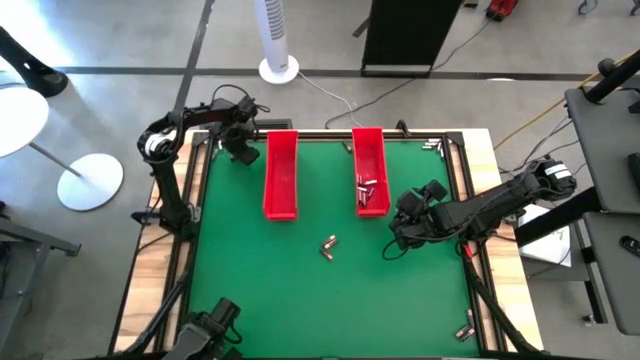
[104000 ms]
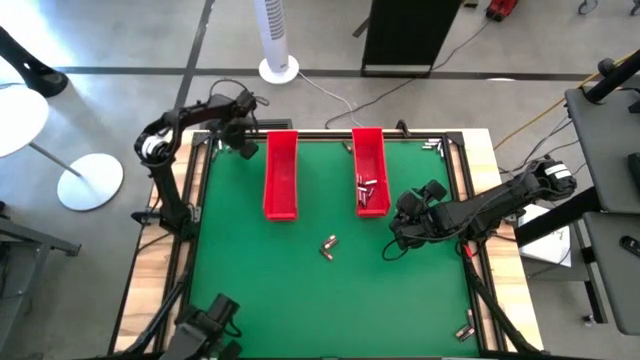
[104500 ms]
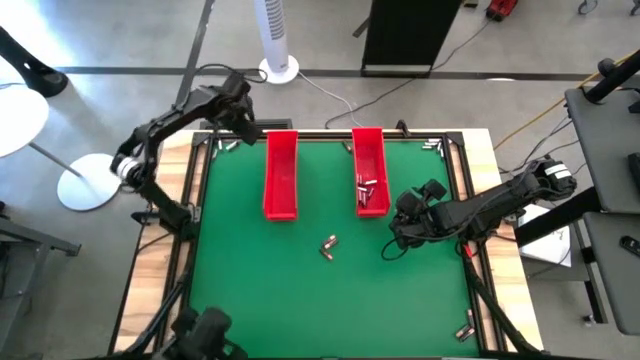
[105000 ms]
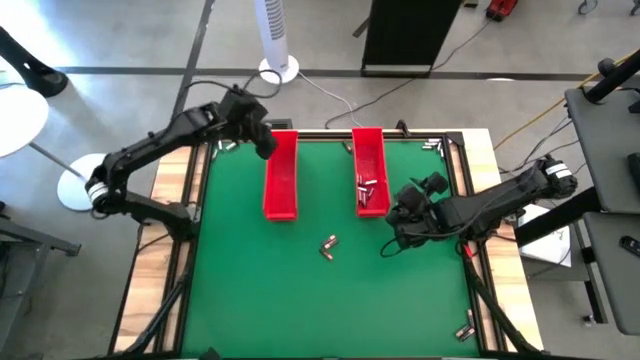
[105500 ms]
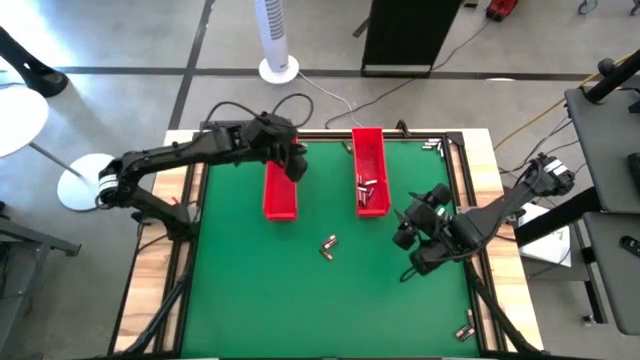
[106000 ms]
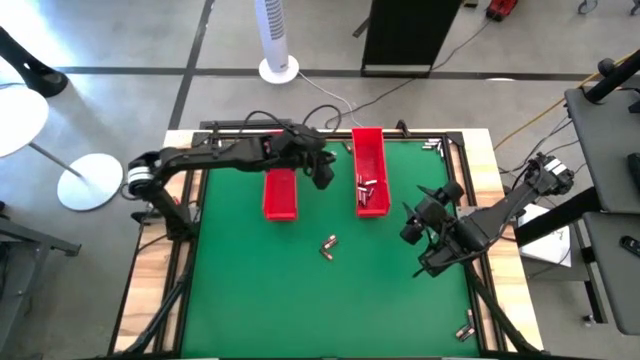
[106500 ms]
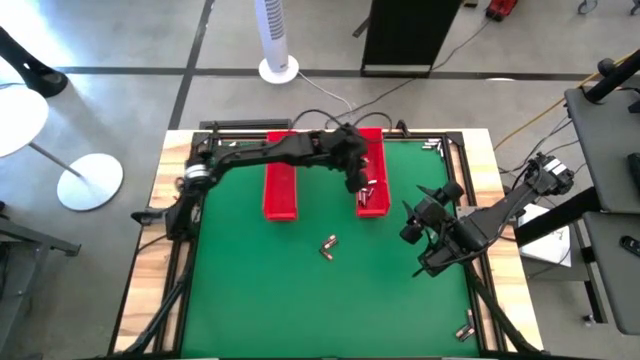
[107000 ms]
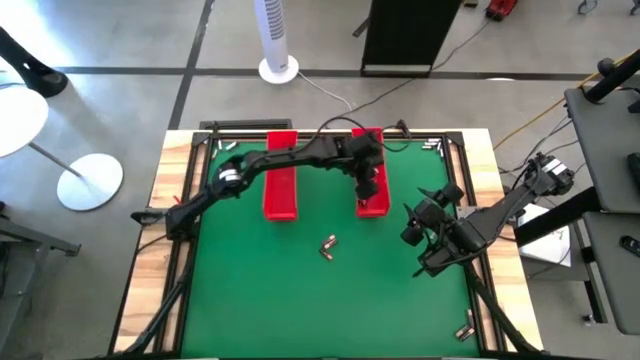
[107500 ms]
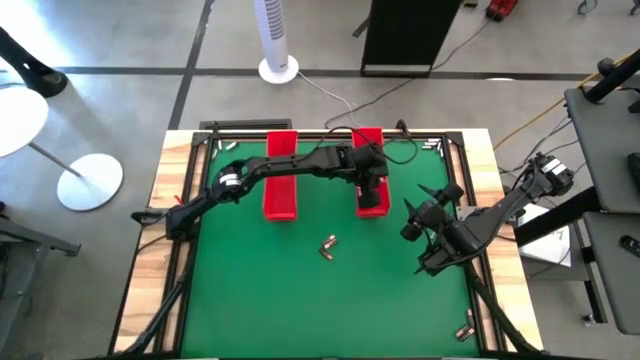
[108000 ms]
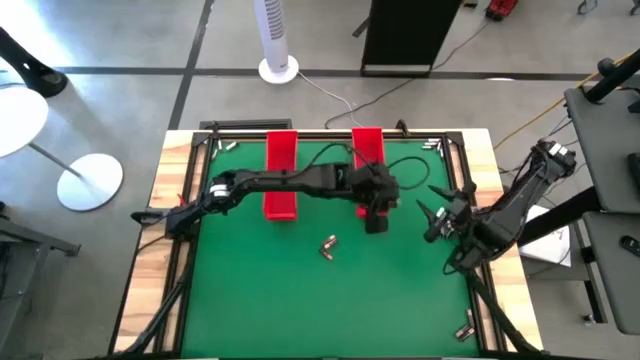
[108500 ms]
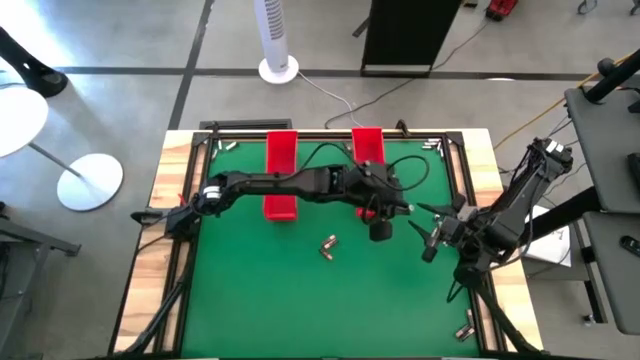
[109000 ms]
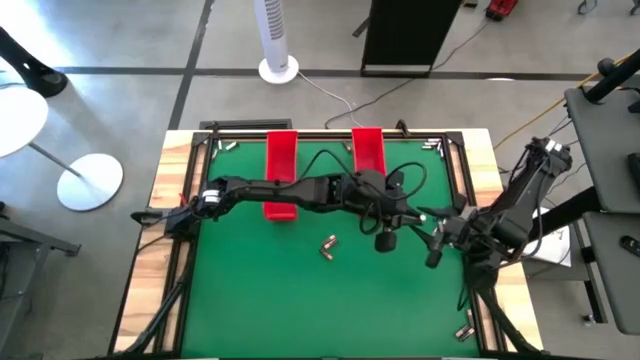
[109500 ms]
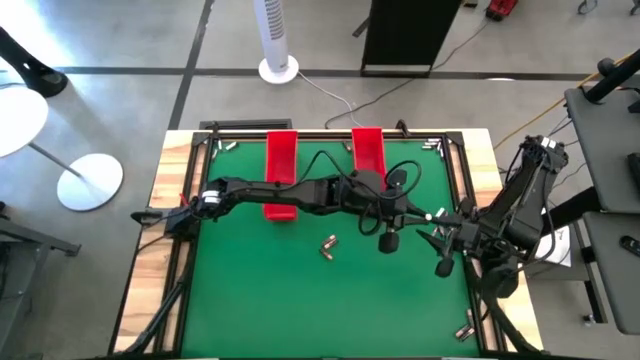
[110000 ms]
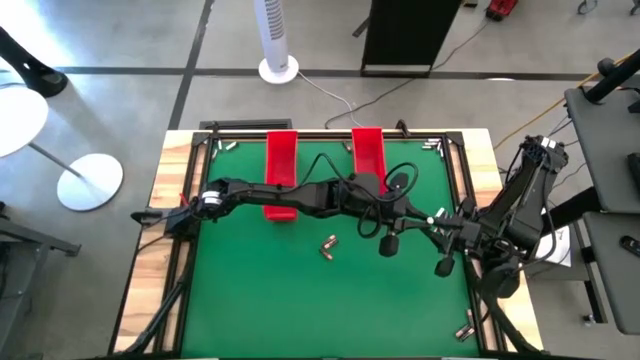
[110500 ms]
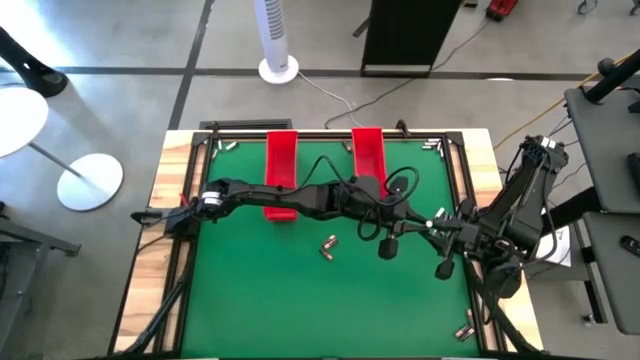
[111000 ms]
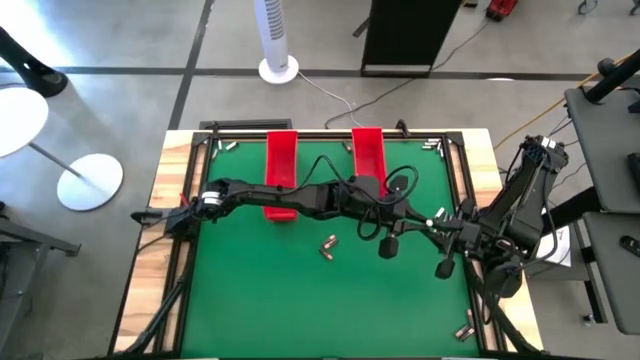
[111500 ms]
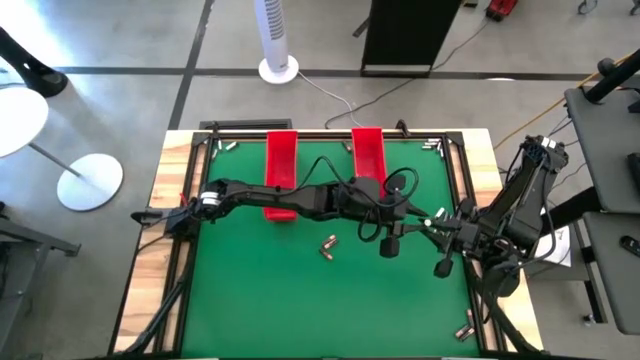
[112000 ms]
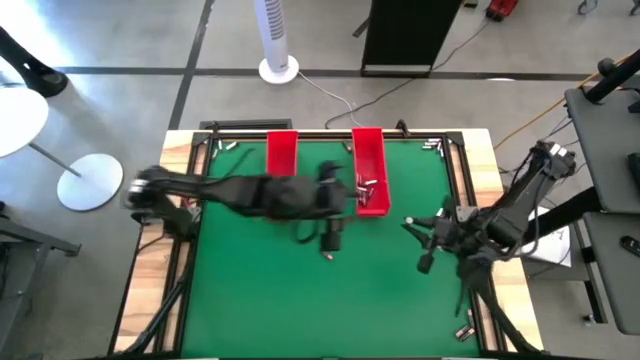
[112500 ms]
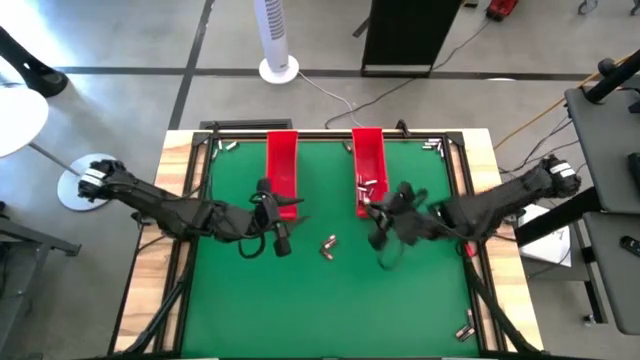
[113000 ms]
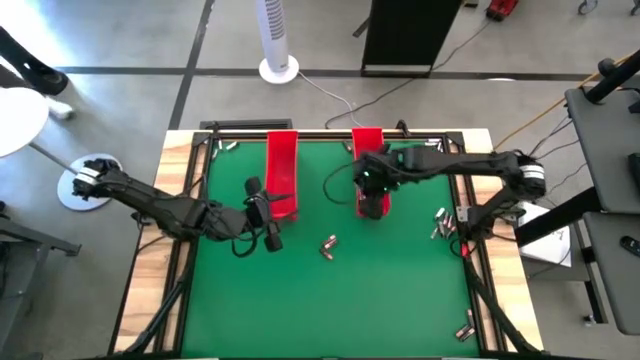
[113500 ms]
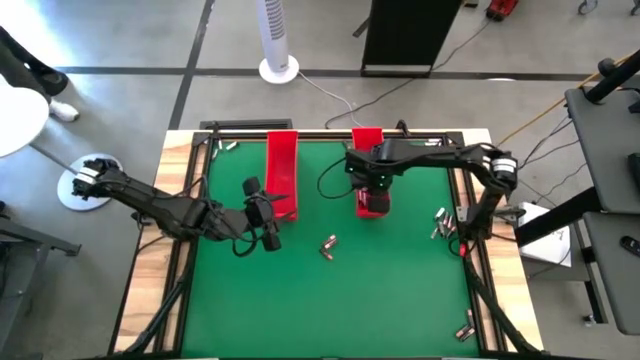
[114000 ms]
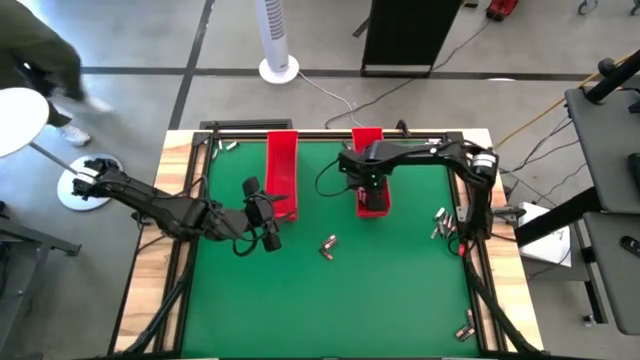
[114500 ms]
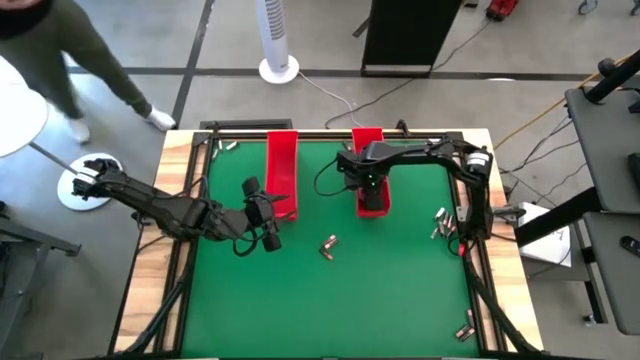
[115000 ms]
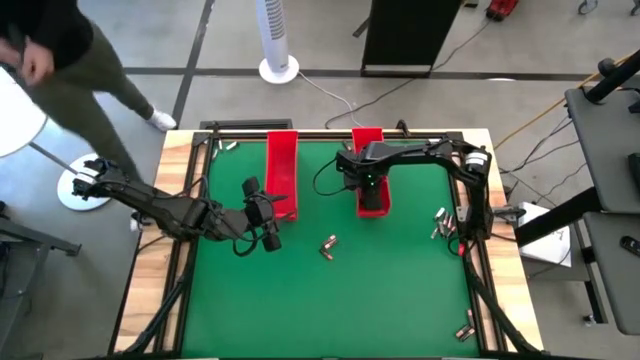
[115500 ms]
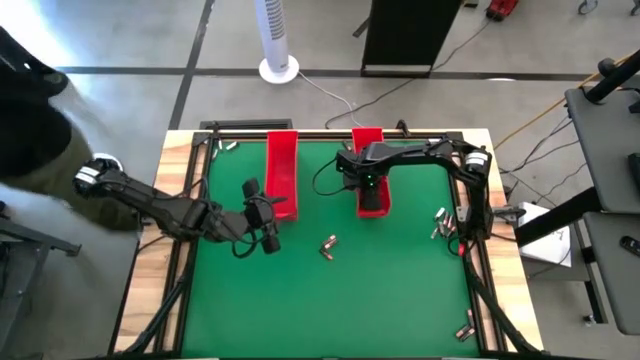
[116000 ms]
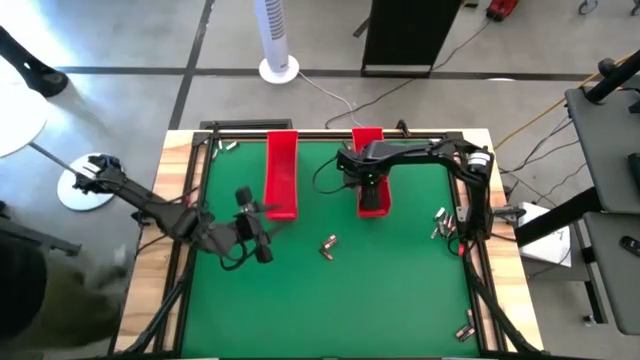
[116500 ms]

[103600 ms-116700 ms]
Task: Sort batteries
Put the silver battery into the right red bin

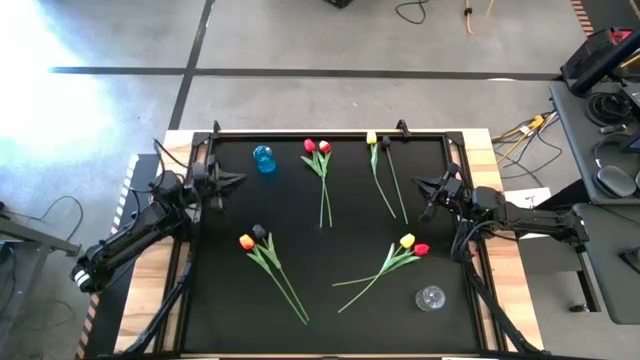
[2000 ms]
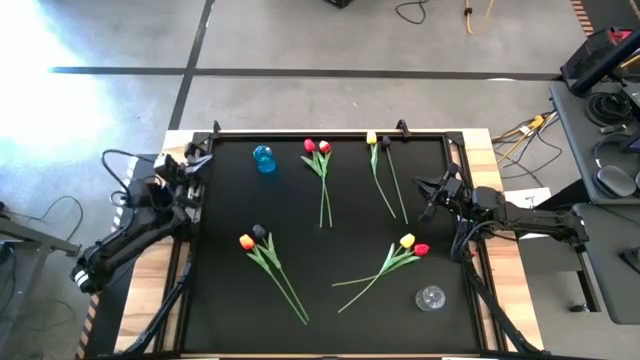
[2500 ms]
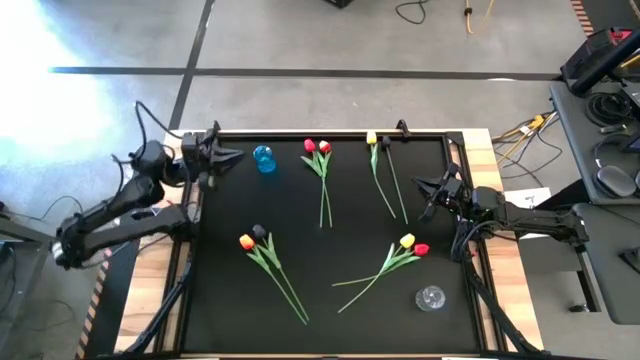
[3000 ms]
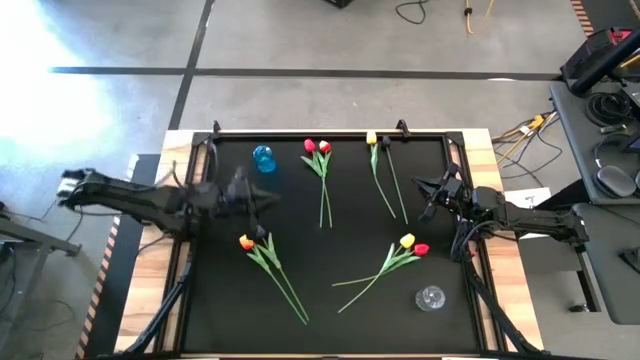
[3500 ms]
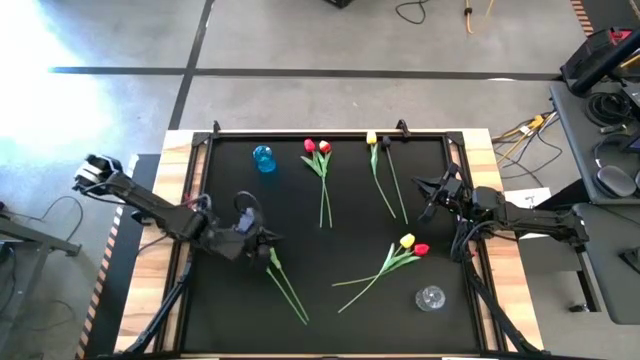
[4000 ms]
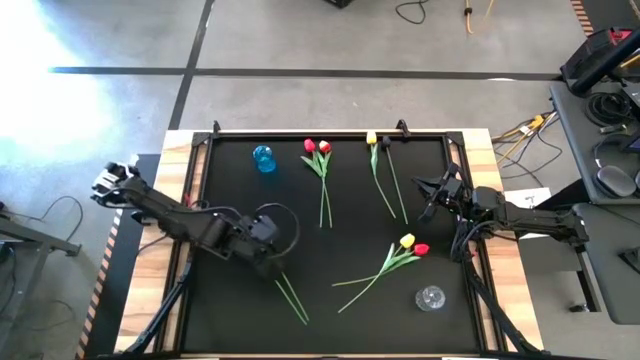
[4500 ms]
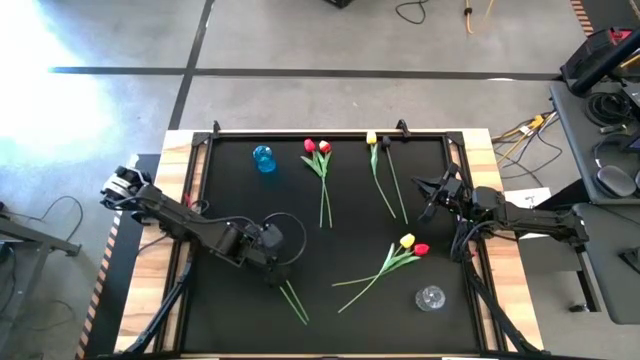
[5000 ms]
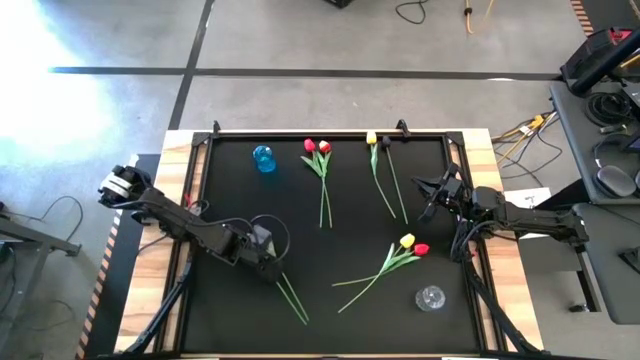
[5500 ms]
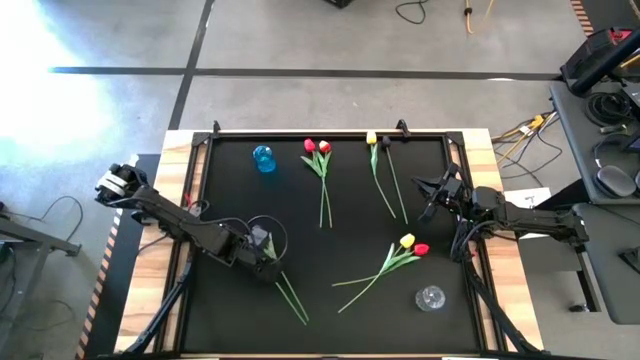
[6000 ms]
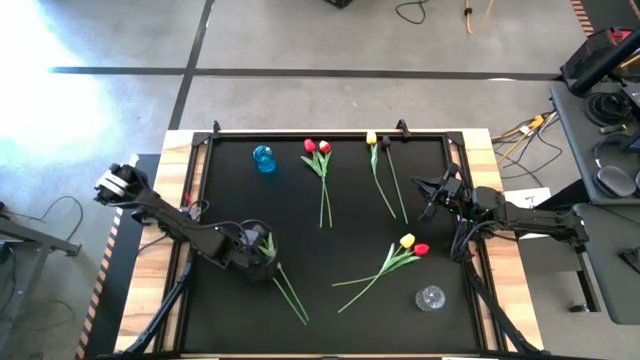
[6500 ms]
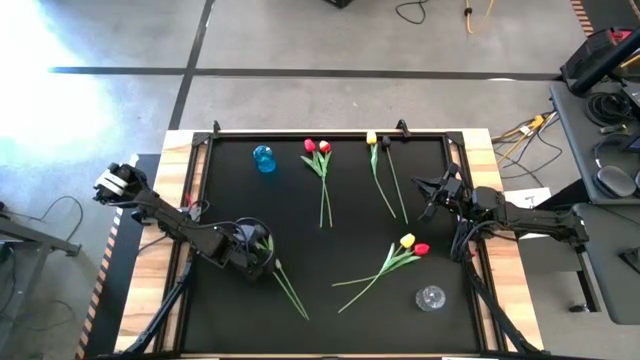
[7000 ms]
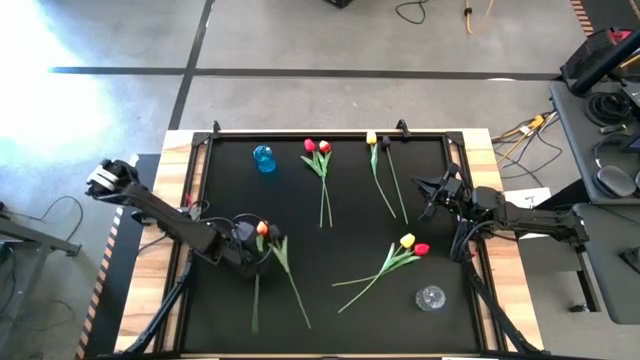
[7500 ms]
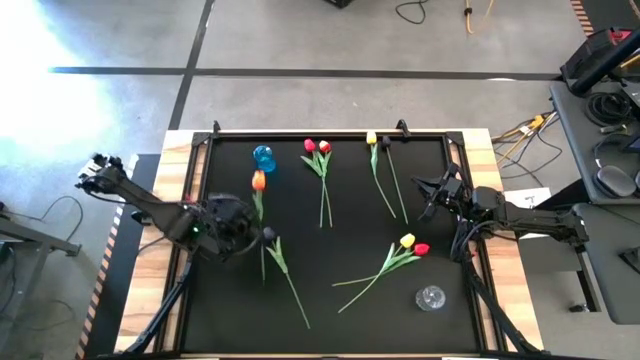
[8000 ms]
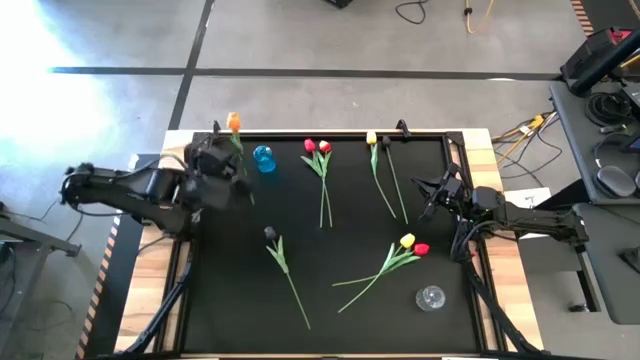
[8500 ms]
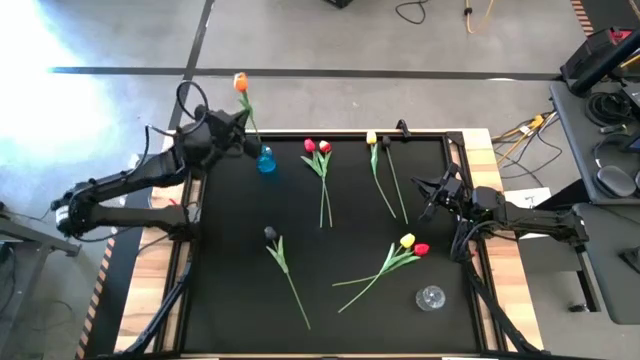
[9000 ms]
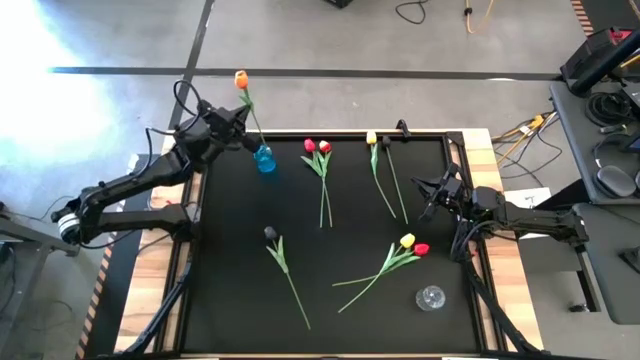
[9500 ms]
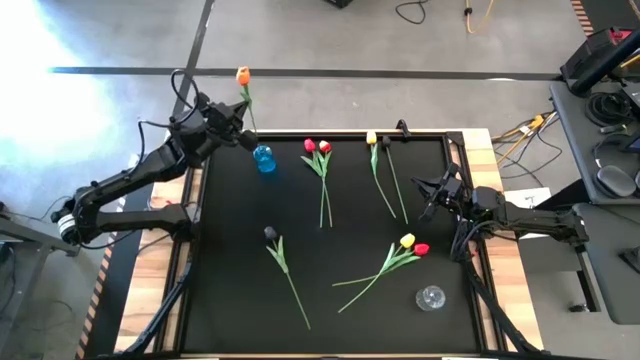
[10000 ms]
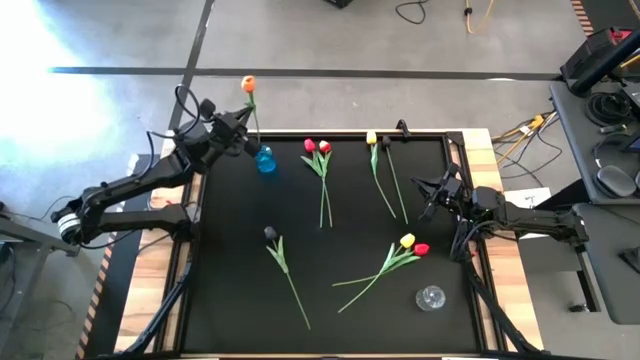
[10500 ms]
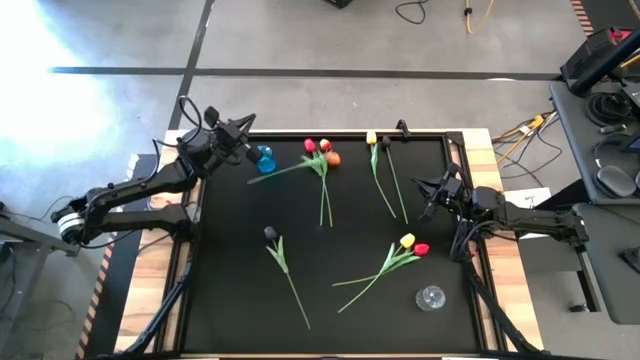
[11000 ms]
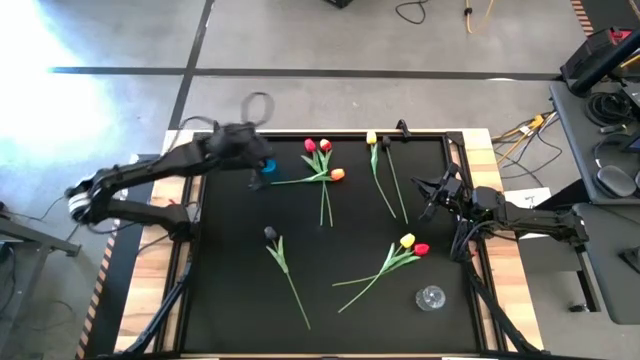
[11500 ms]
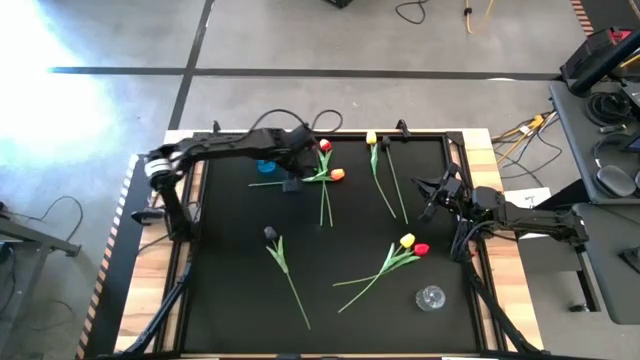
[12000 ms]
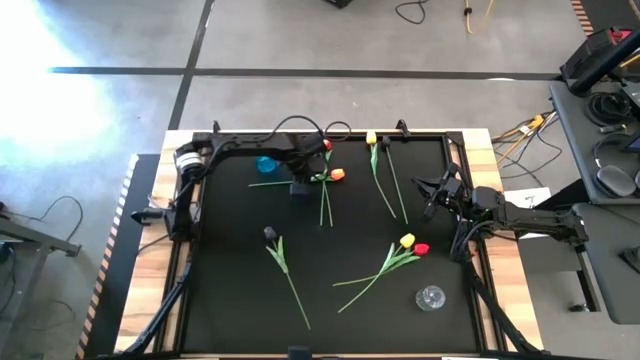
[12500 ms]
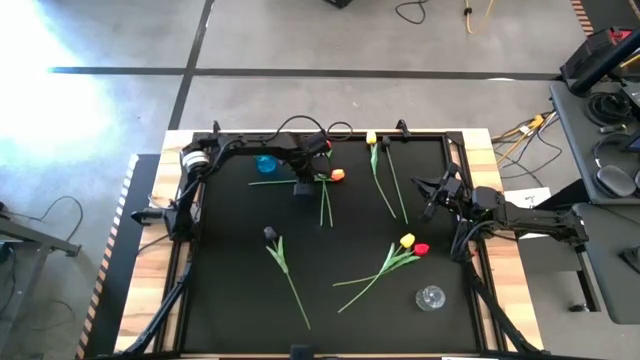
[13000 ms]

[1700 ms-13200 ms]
Task: Sort flowers into vase by color
Put the bottom orange flower into the blue vase
